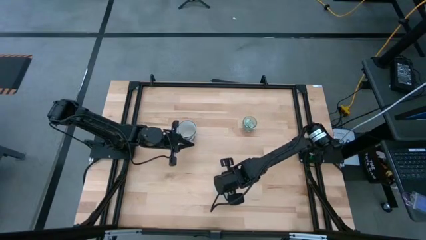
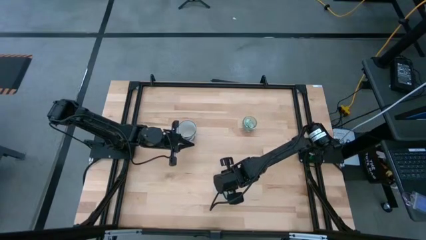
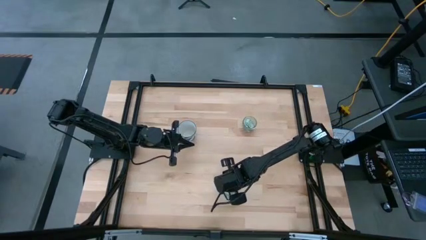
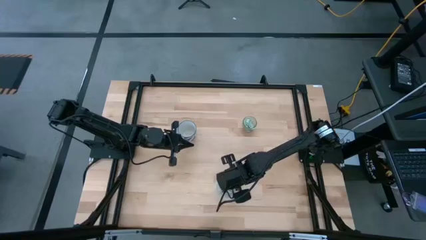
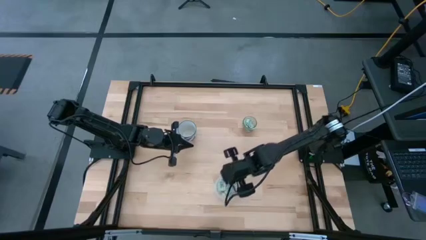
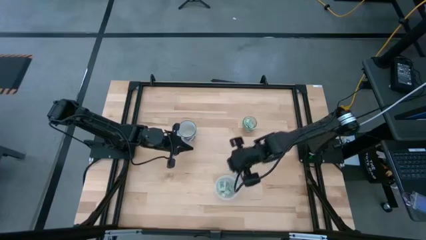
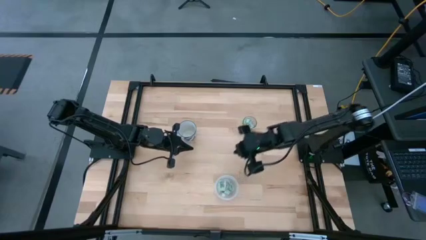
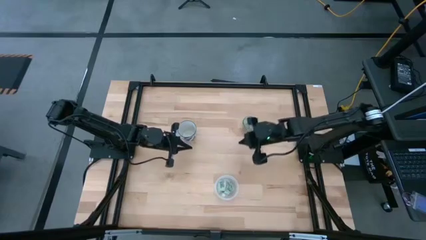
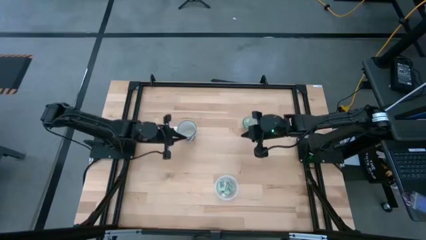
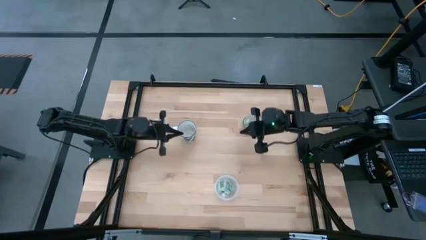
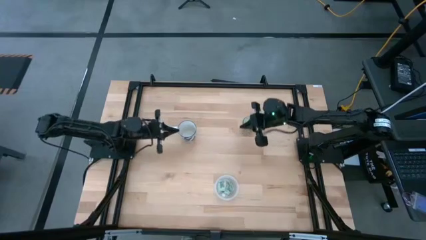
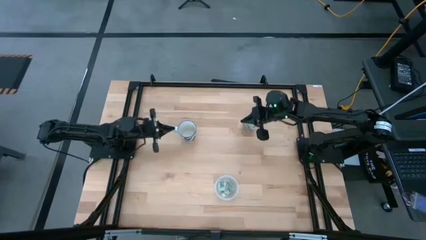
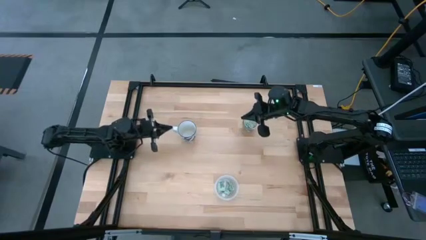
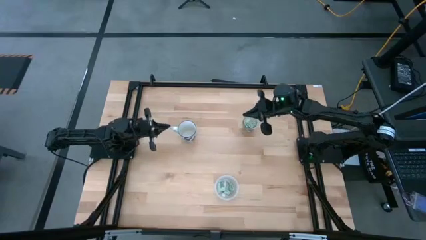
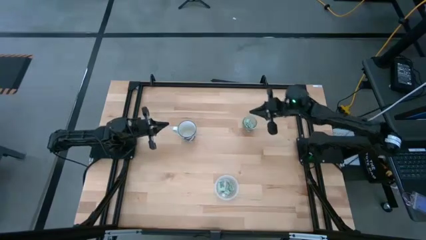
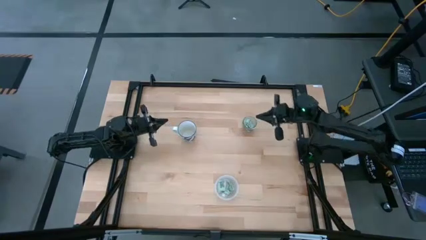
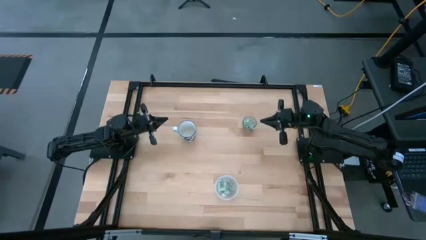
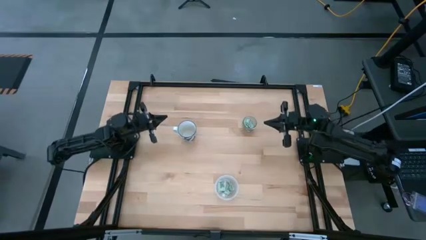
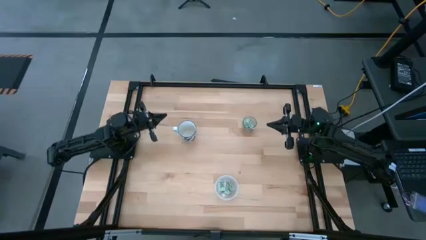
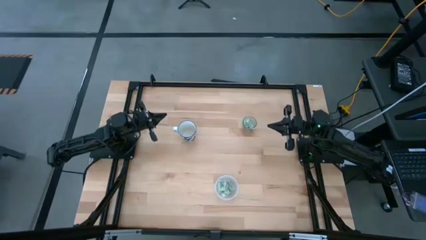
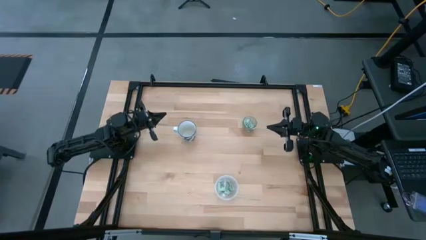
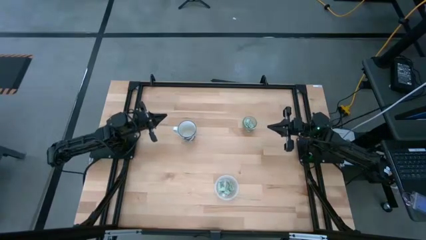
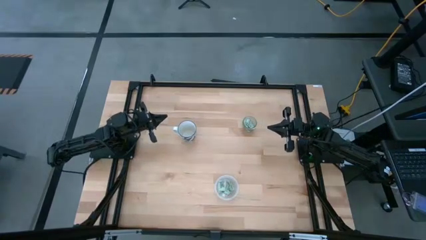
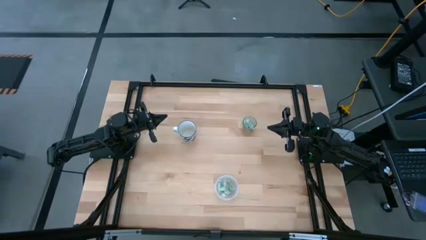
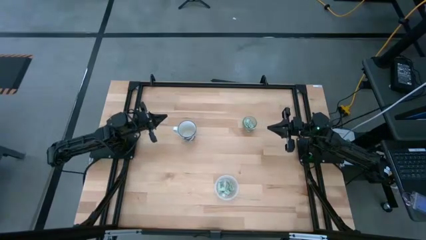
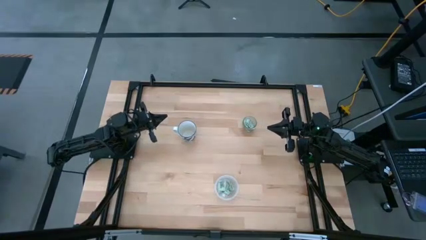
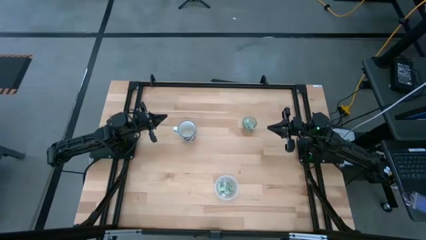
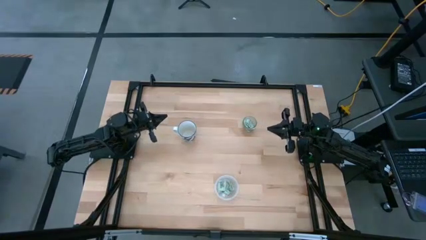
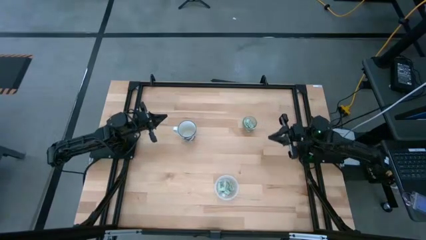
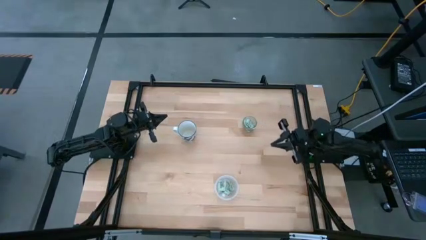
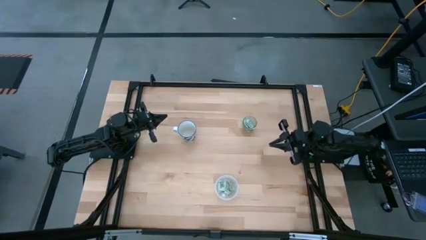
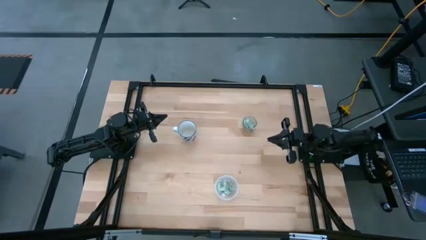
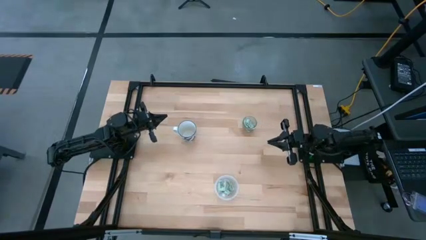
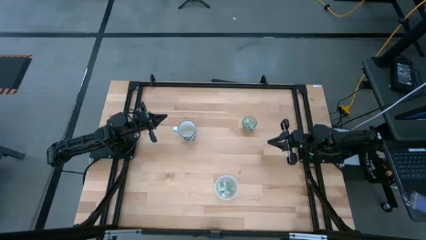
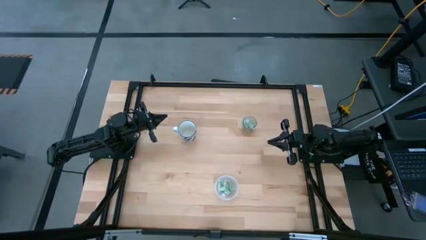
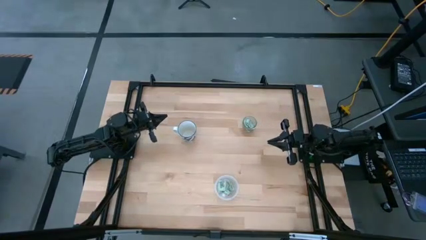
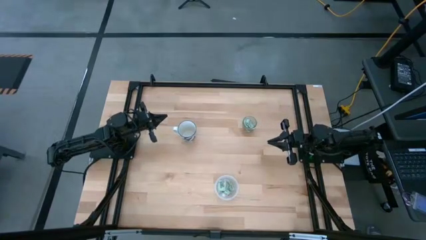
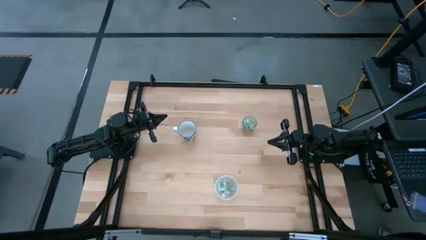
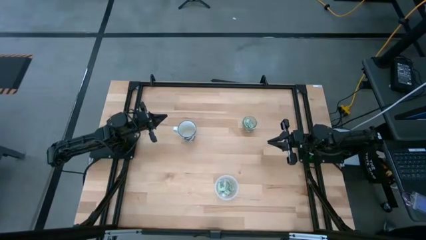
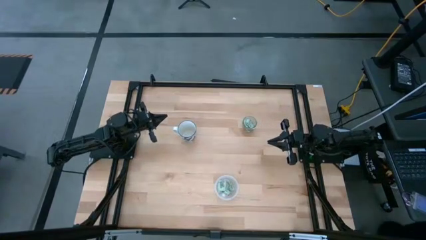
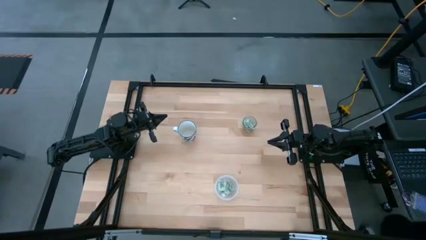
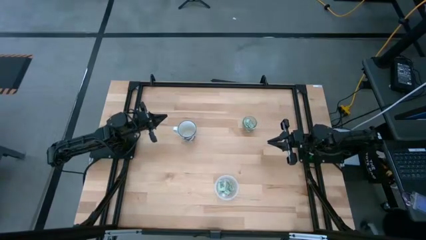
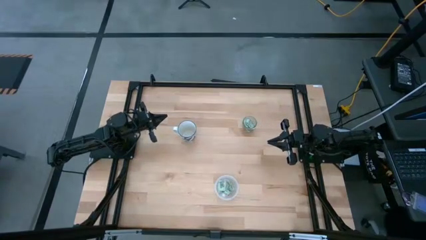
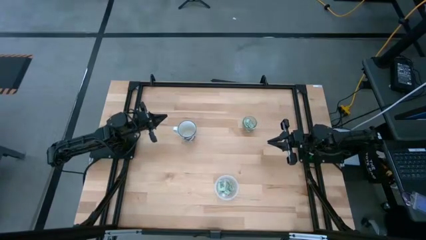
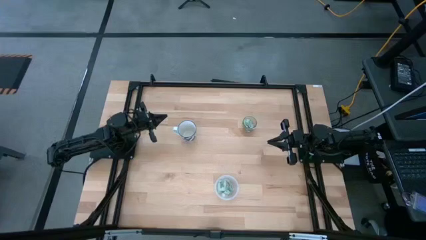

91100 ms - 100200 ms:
Task: Pick and place Stevia / Truvia into bins
Return to Home Position

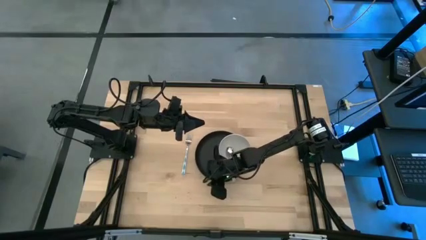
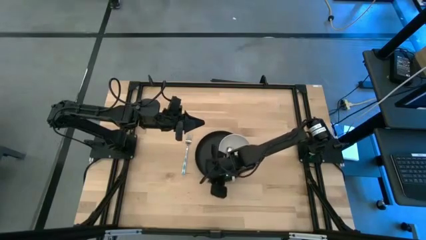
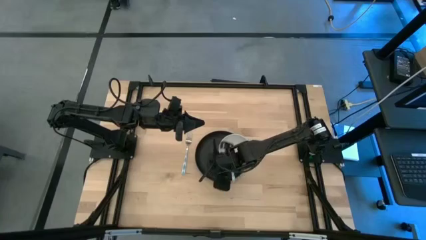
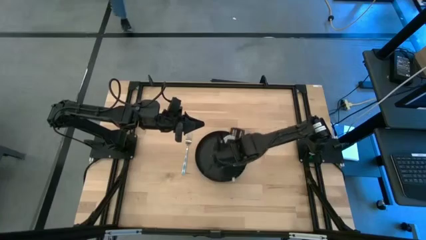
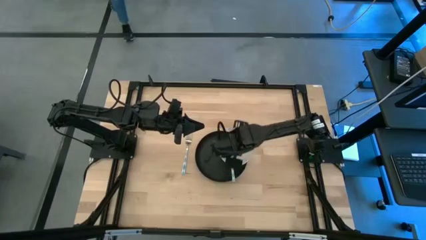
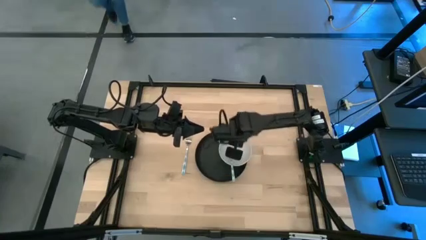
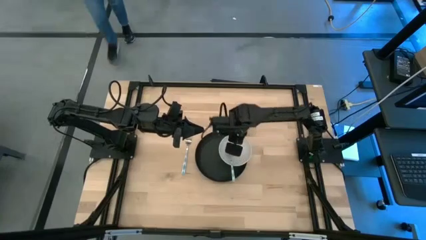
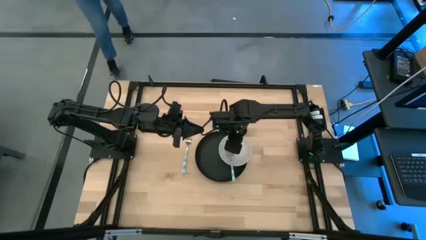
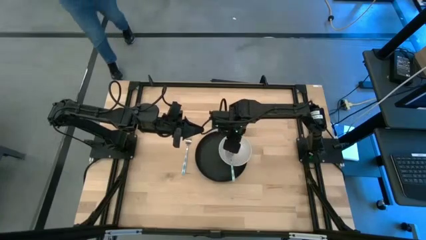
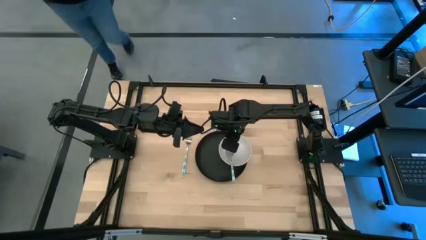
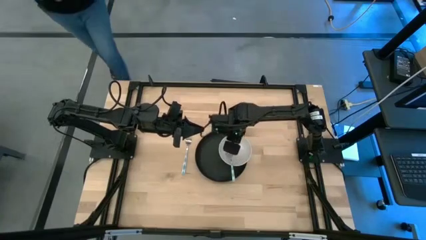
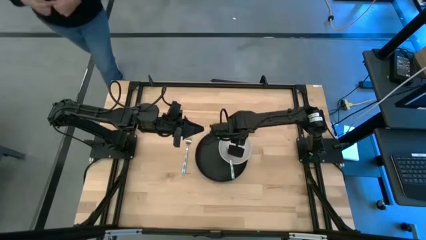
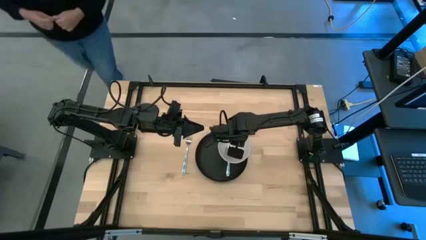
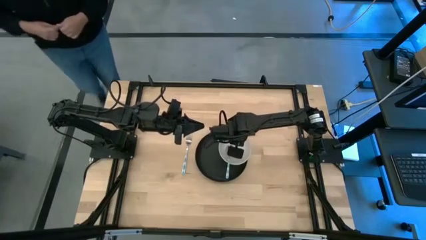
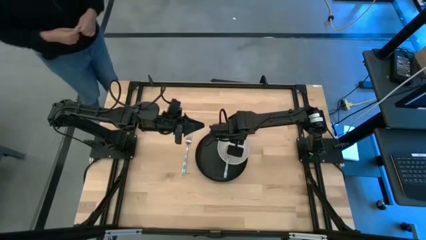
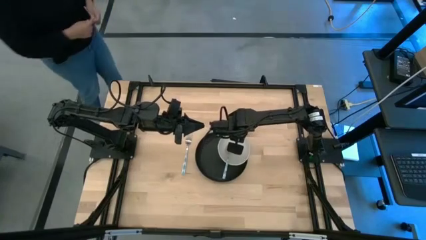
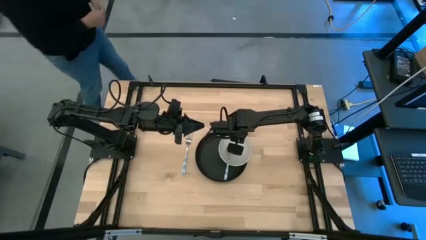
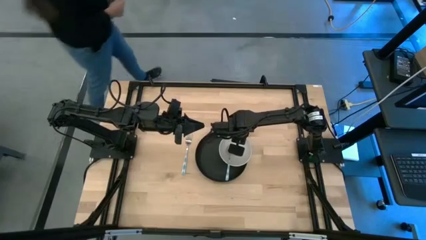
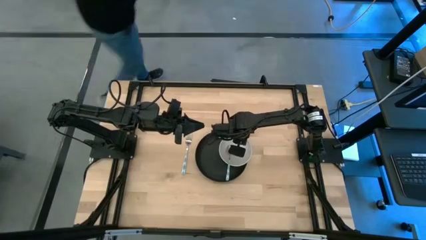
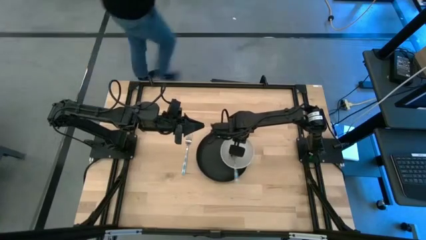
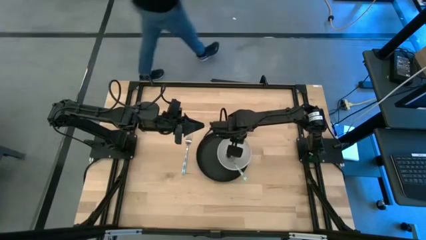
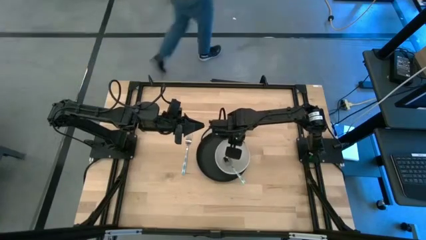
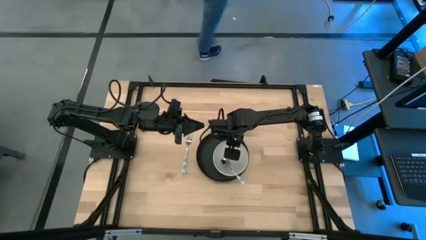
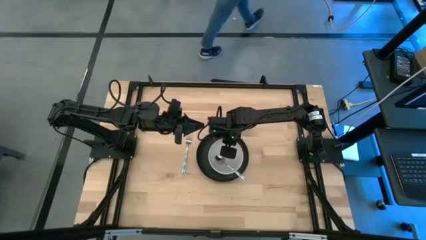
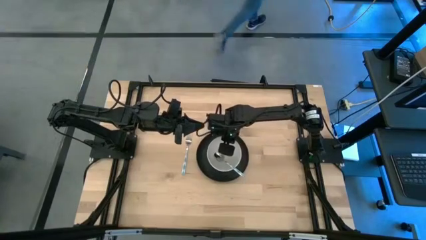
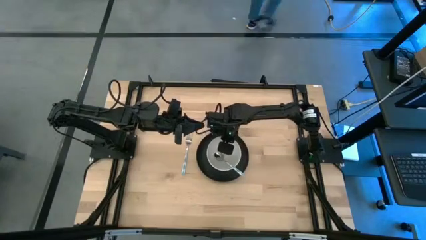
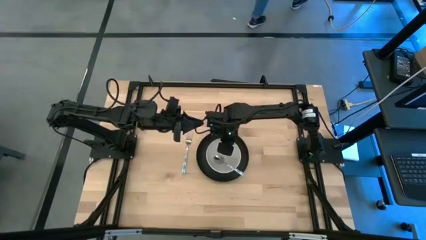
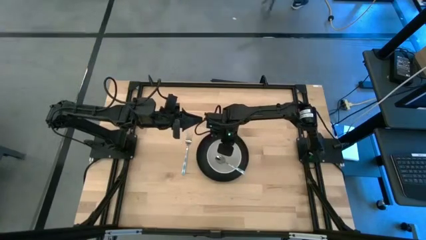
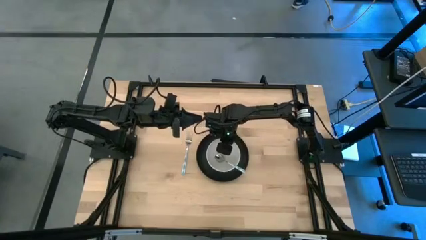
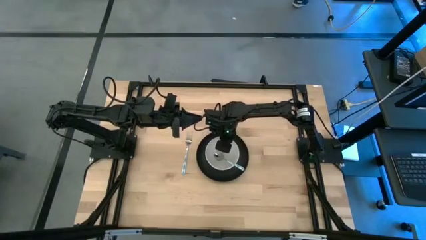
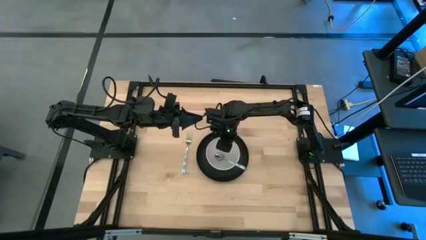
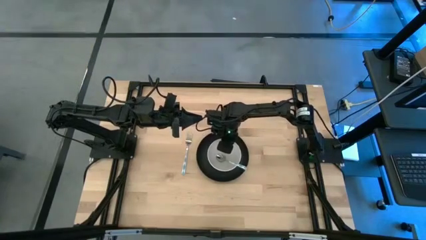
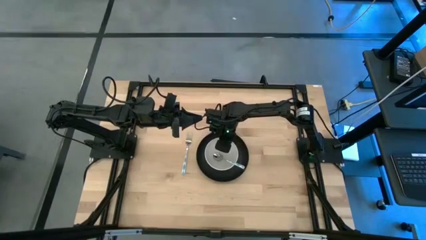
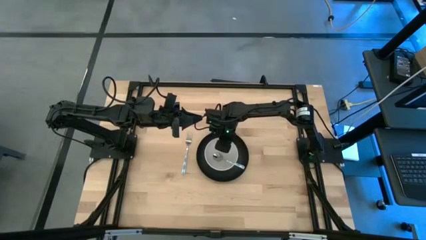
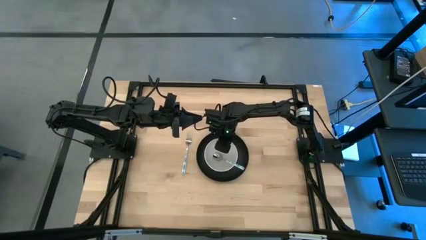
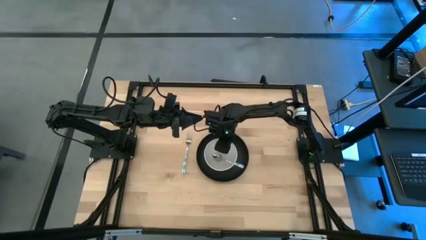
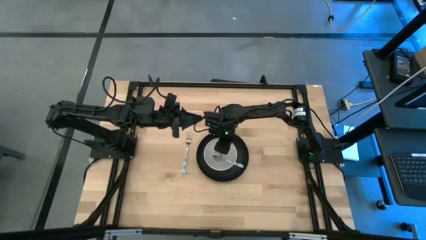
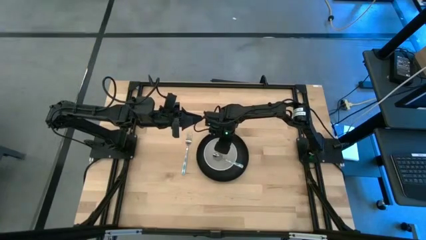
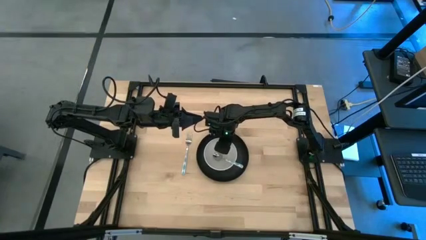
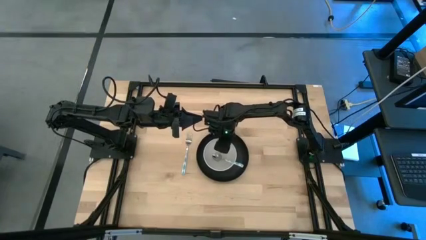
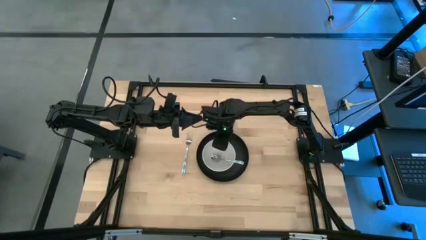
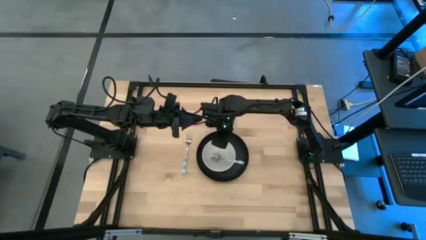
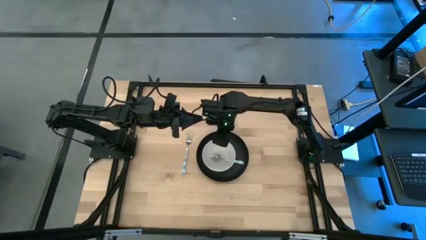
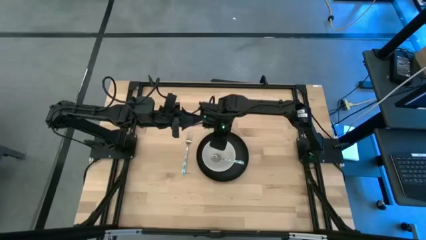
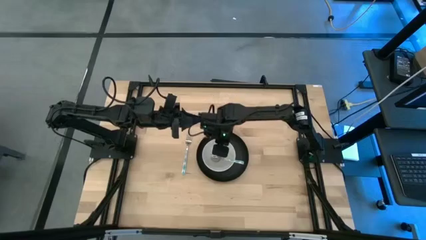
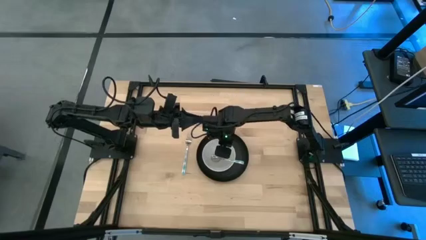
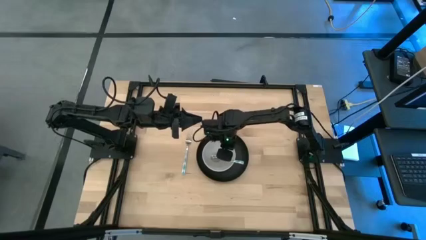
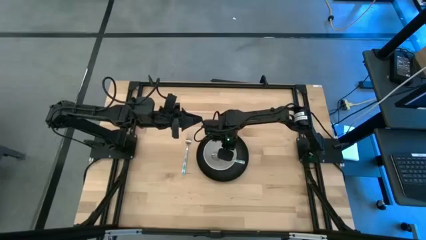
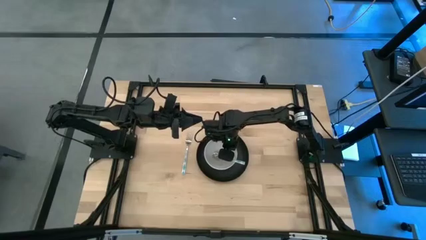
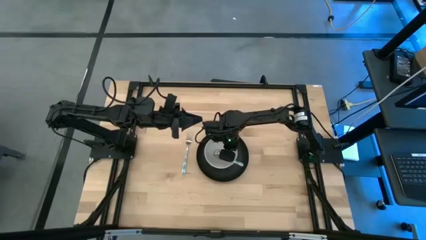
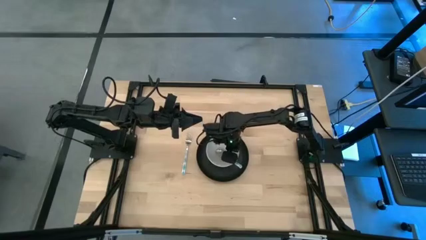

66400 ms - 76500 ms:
Task: Set table place
Adjust the white bowl
